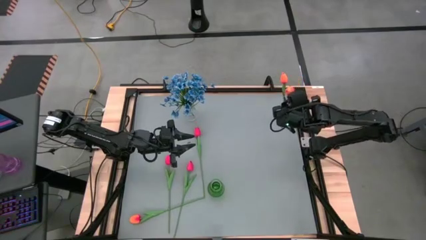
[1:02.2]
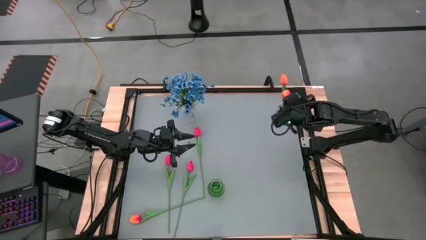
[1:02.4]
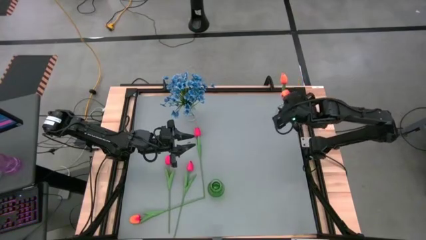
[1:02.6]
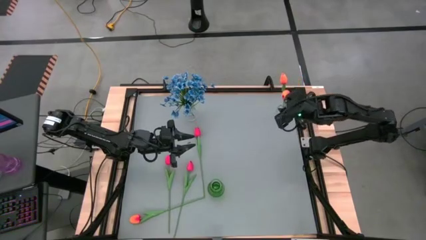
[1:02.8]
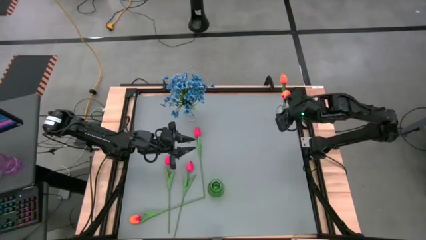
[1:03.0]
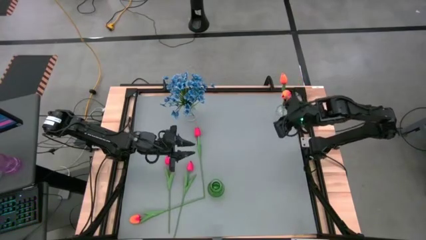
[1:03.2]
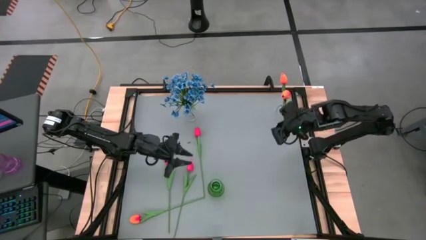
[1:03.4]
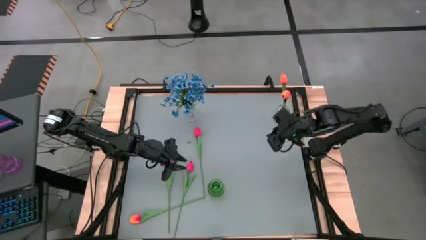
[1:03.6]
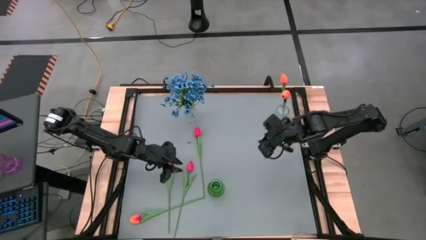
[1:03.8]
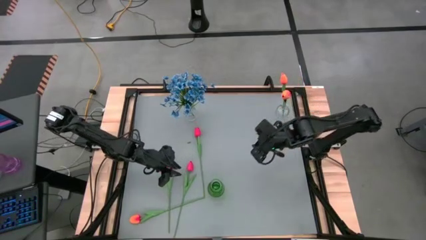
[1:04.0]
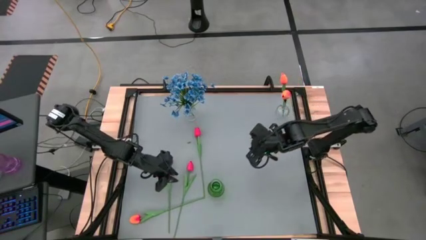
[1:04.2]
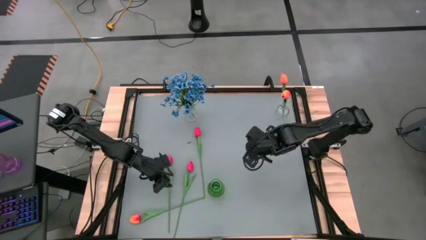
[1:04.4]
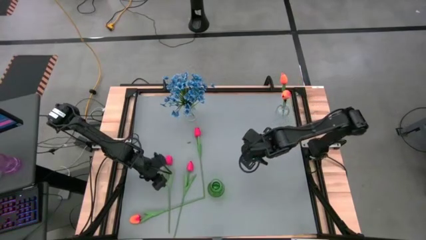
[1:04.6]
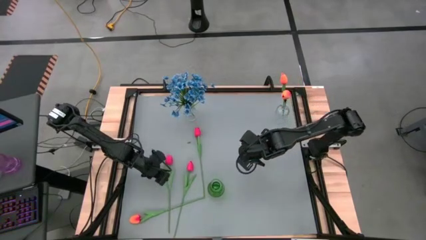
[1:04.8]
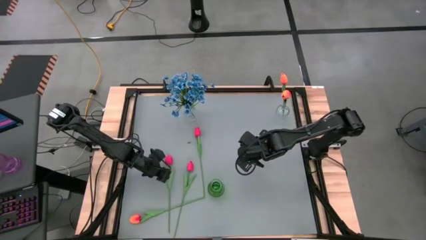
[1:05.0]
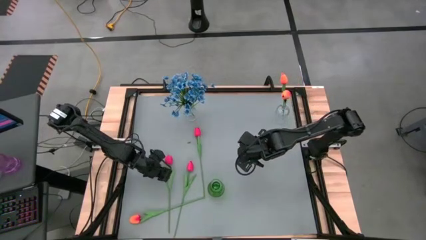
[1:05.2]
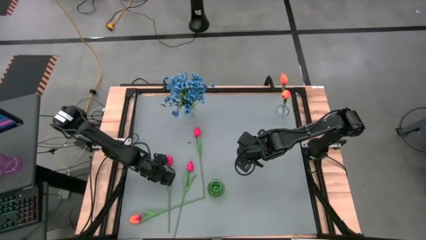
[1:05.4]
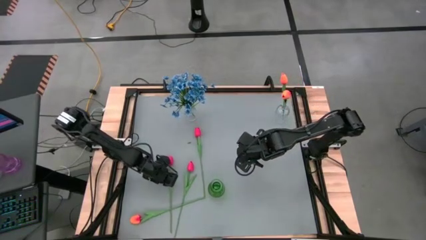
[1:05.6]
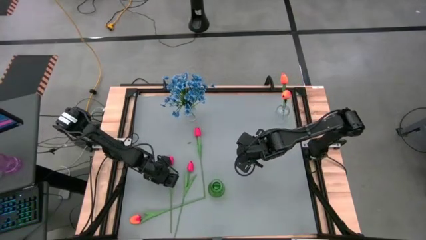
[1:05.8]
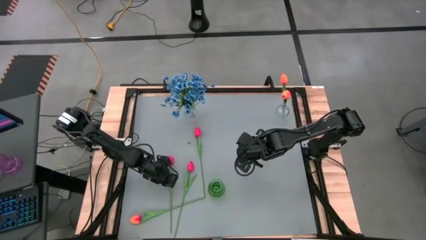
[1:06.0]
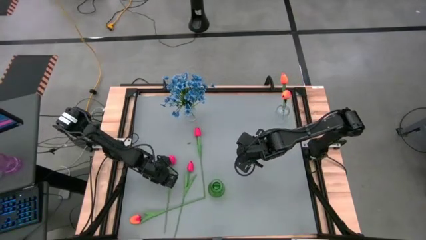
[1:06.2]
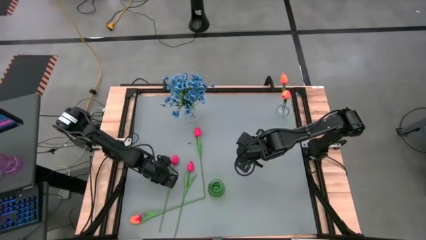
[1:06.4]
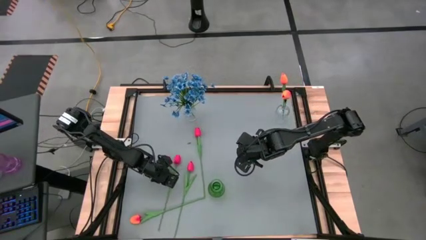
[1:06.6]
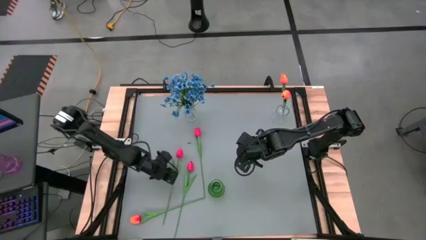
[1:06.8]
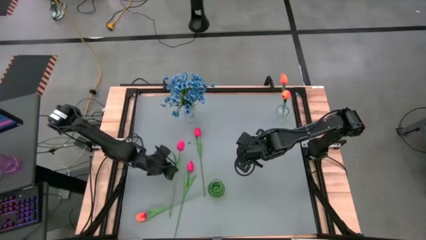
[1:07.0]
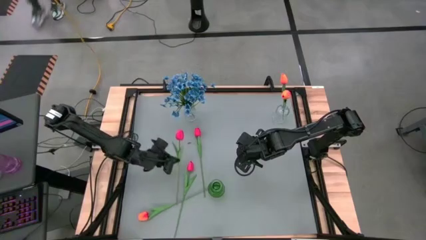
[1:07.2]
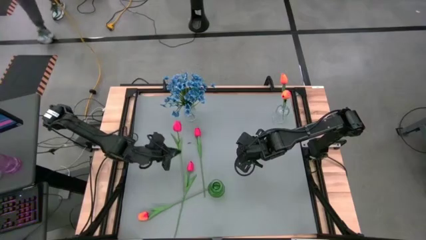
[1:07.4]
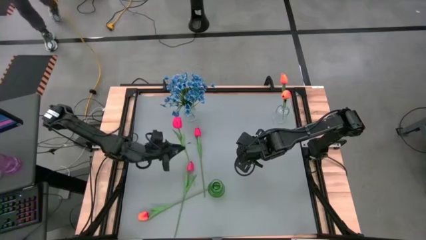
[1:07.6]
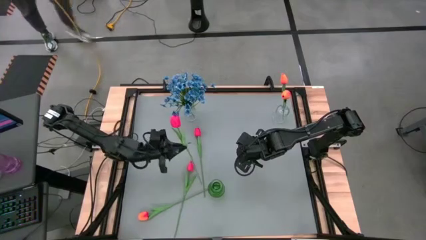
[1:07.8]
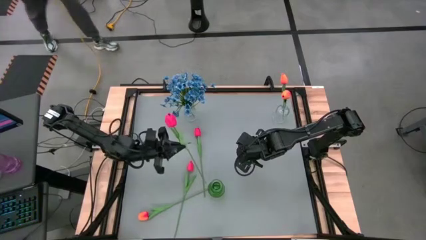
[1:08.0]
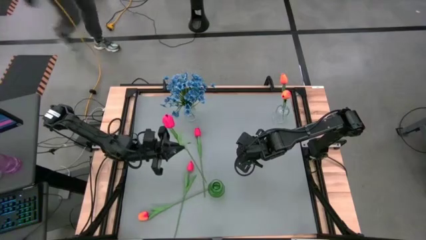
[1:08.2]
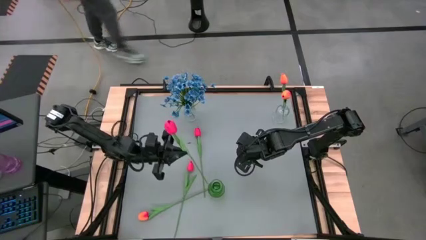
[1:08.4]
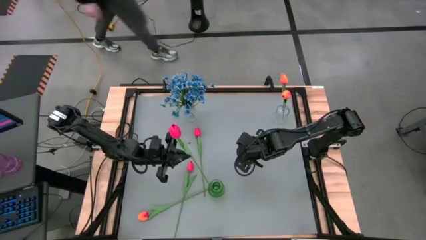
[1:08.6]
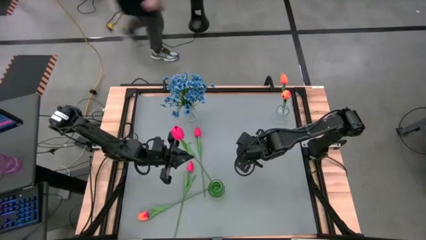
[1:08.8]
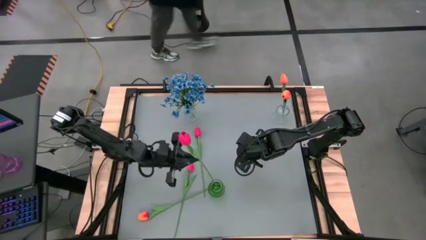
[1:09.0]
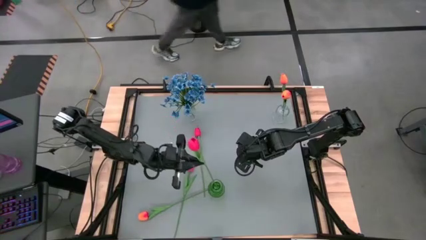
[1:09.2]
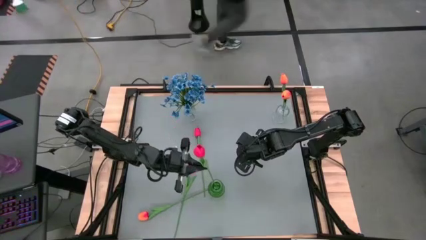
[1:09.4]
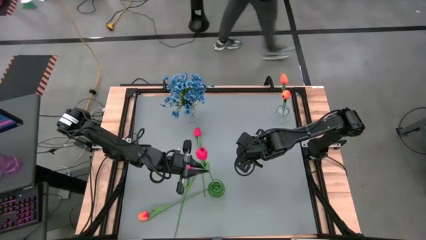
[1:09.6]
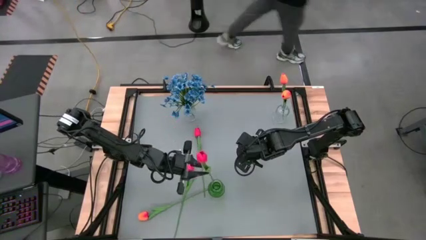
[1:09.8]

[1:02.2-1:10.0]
Task: Sort flowers into vase by color
Put the left pink tulip into the green vase

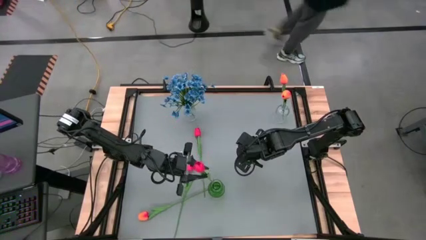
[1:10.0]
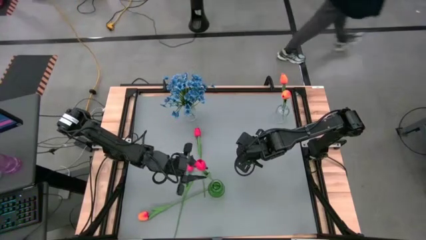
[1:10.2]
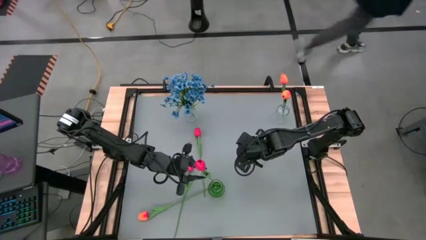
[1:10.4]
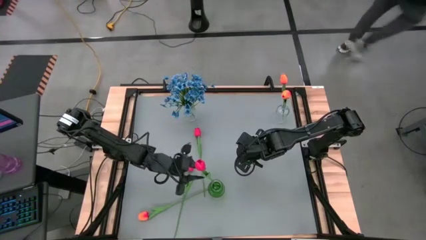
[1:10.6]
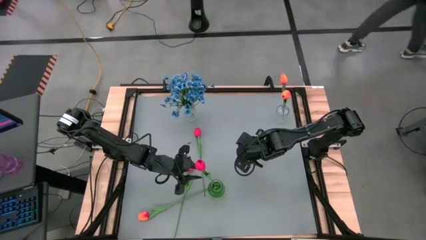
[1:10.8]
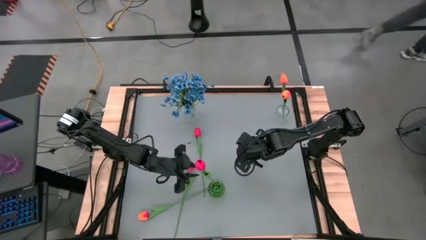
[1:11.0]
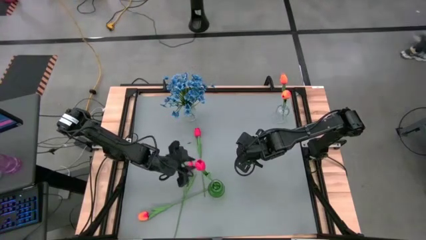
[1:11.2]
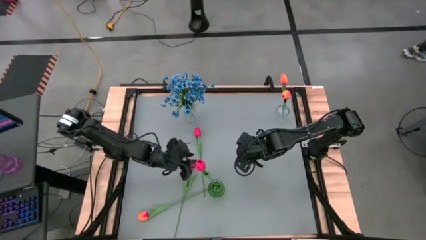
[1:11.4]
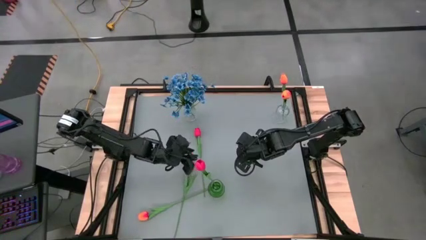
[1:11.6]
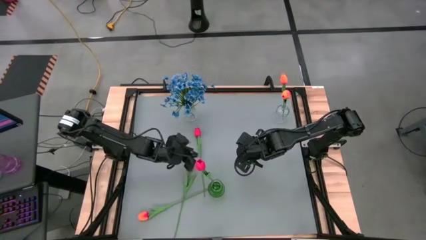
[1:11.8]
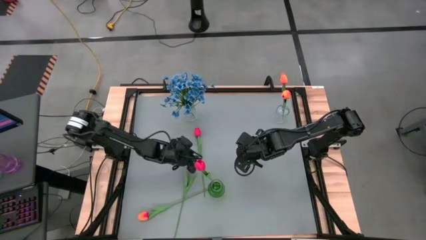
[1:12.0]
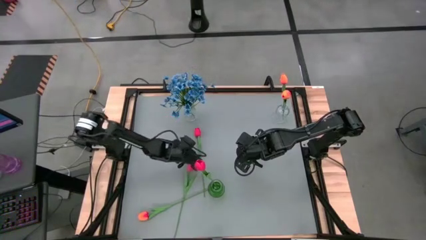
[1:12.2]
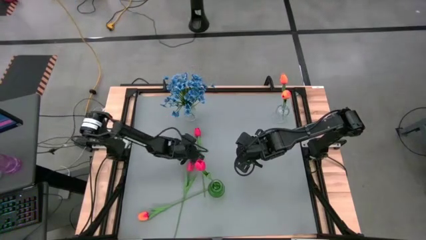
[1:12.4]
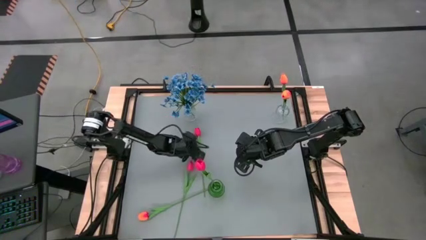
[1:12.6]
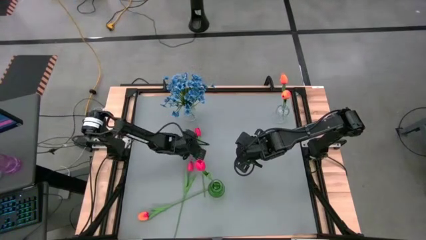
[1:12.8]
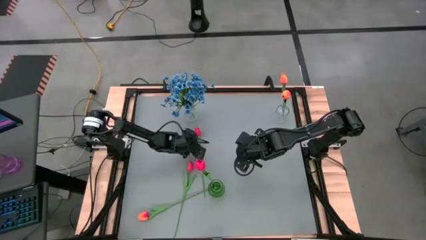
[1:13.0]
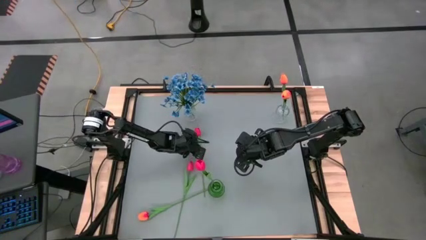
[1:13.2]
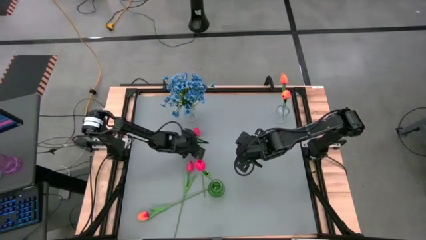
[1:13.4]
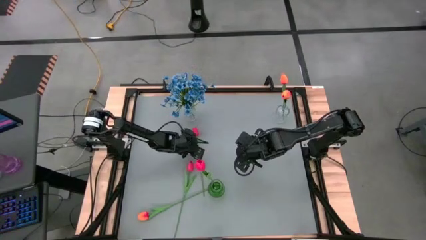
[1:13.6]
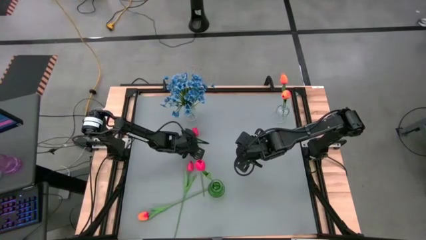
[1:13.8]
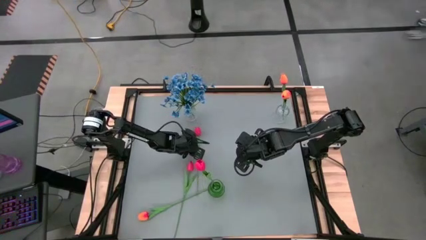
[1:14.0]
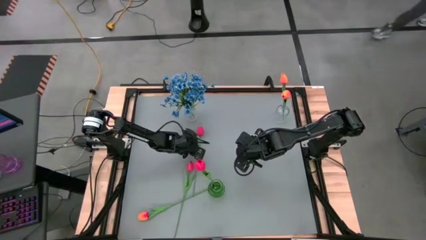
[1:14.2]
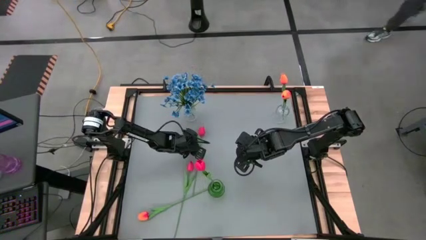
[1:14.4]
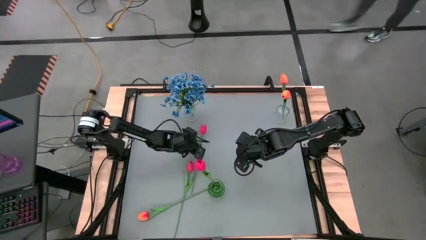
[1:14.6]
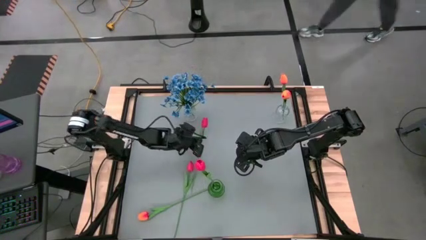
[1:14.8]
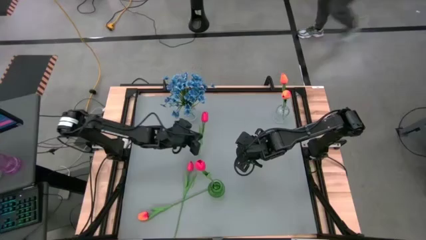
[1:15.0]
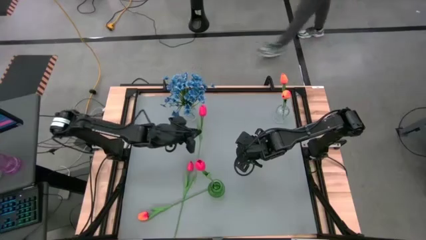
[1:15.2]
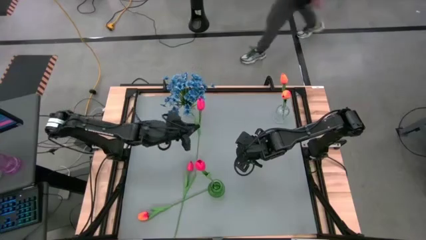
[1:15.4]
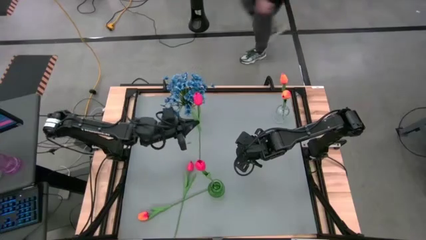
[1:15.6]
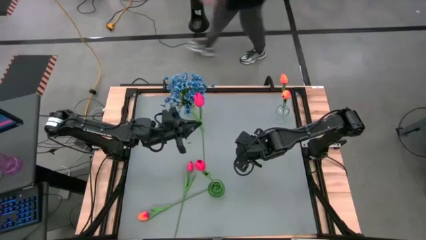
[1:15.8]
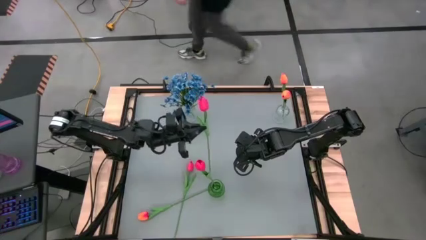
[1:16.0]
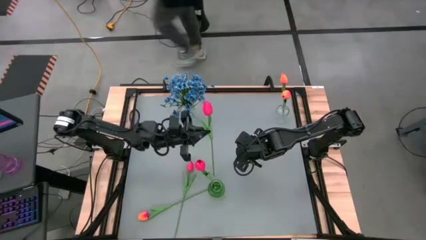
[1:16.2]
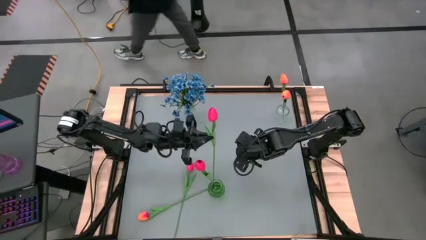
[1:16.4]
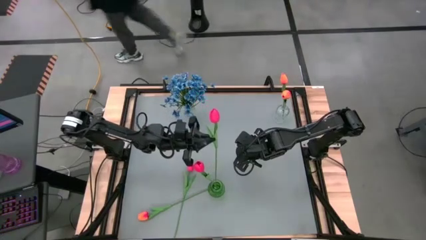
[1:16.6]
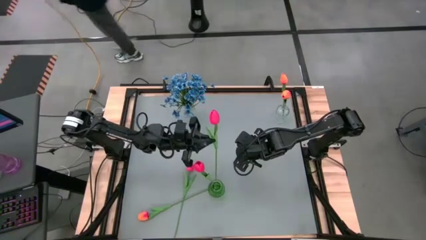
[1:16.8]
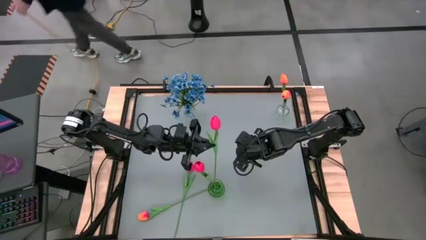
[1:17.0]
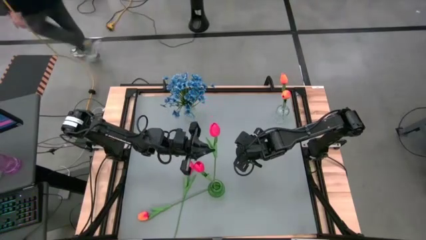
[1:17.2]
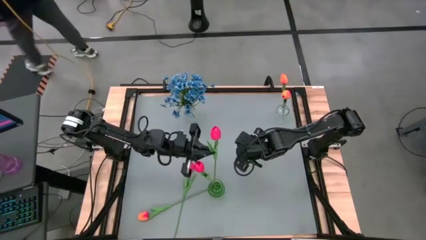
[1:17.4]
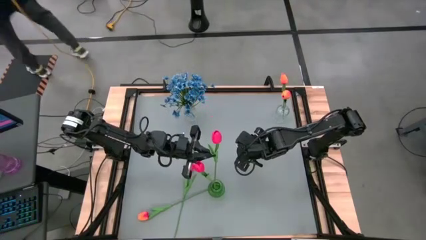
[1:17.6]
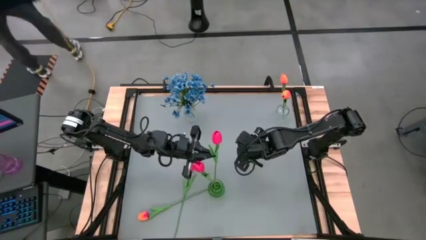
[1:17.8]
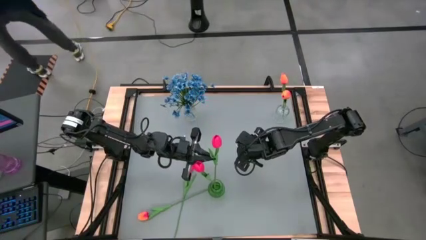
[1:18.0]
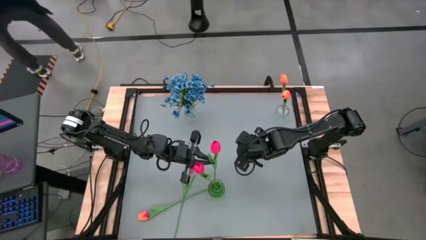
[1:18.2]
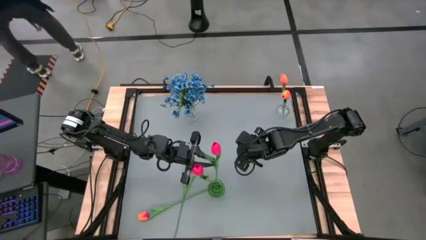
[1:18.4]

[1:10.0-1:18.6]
Put the top pink tulip into the green vase

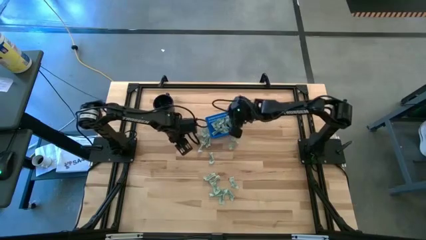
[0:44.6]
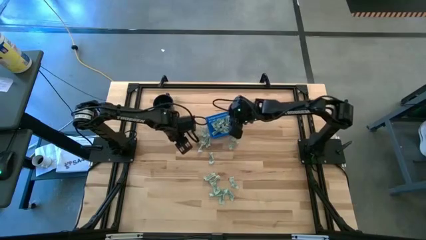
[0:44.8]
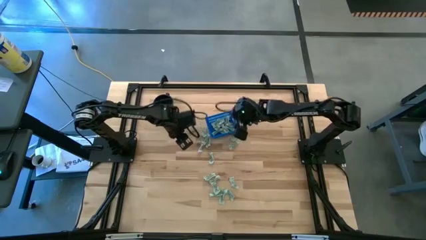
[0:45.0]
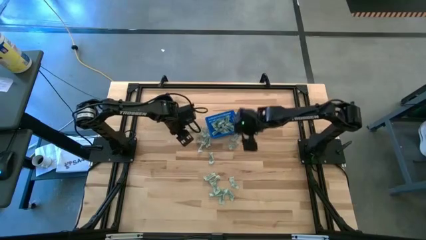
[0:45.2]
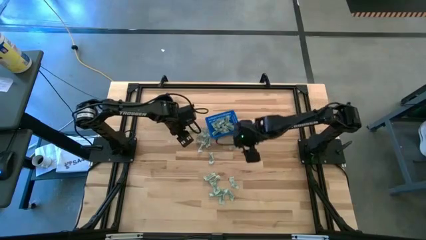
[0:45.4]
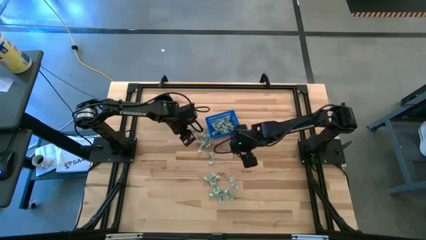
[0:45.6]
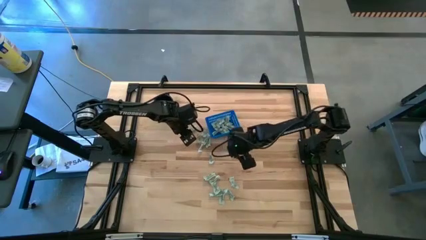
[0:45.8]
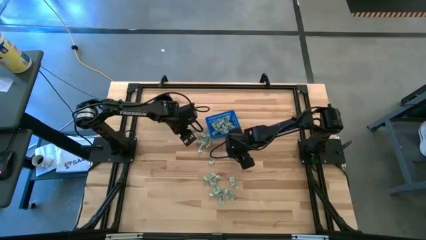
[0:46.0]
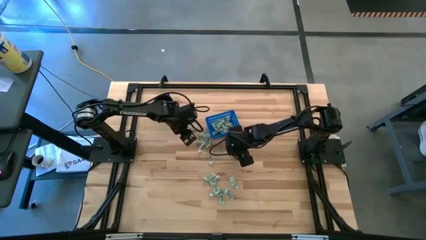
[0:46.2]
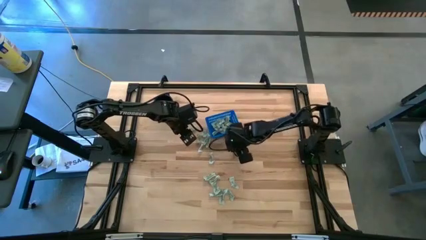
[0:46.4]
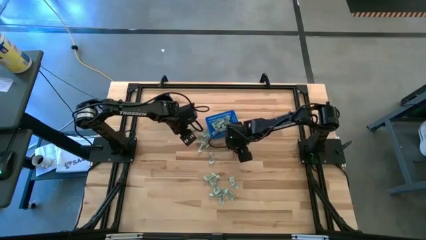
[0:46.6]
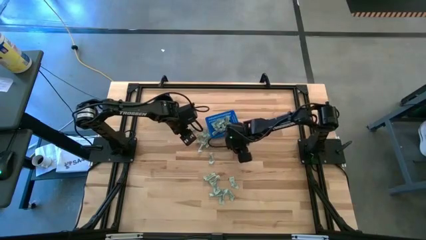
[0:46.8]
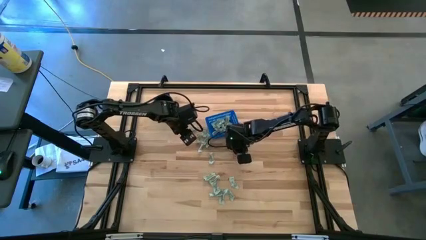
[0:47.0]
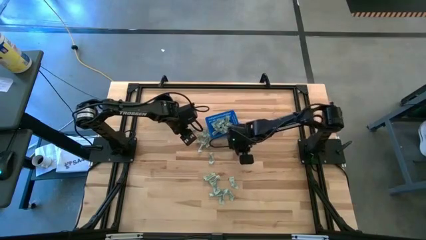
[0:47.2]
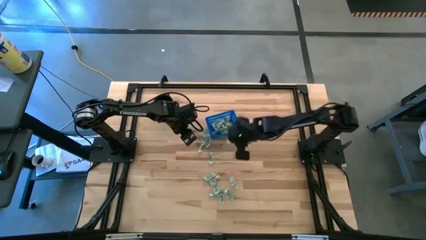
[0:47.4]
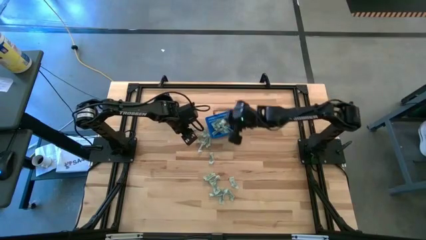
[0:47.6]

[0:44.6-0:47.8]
Task: Pick and place Stevia / Truvia into bins
Put the green stevia packet into the blue bin
